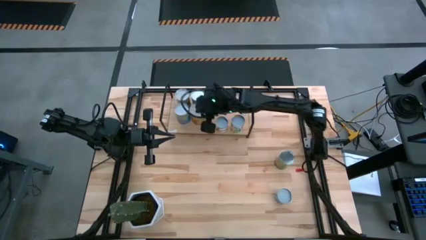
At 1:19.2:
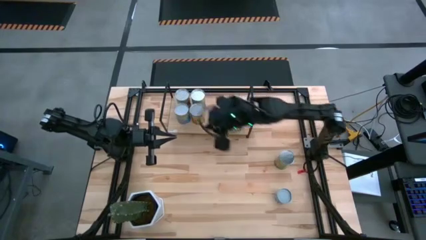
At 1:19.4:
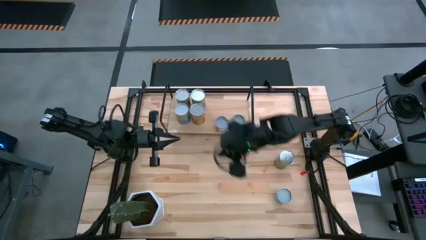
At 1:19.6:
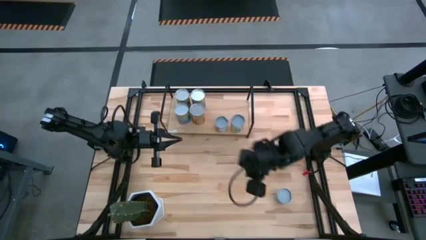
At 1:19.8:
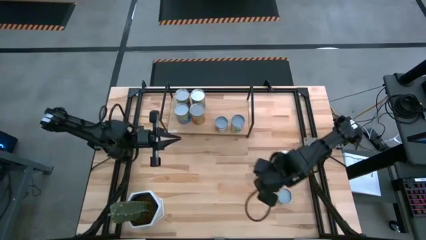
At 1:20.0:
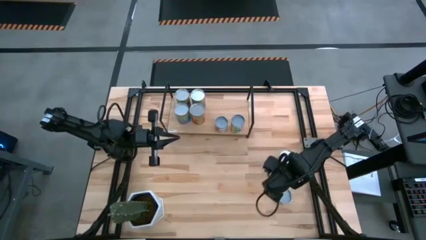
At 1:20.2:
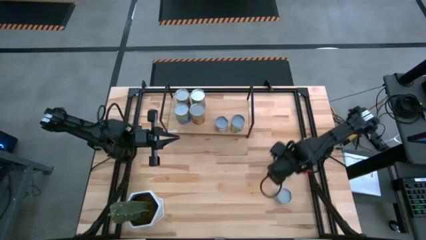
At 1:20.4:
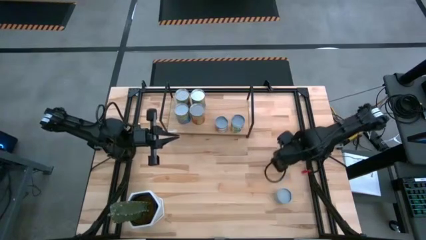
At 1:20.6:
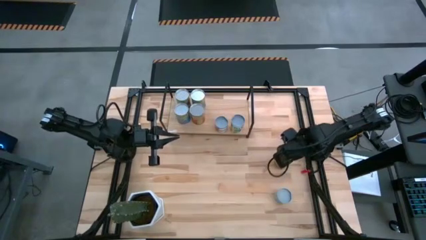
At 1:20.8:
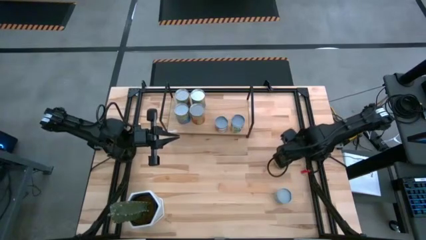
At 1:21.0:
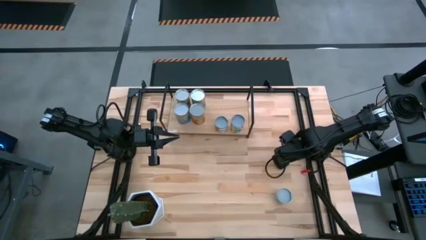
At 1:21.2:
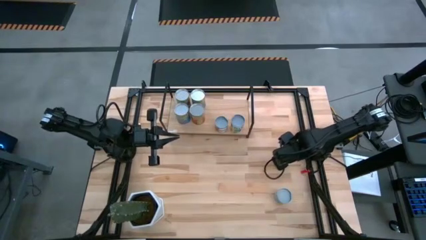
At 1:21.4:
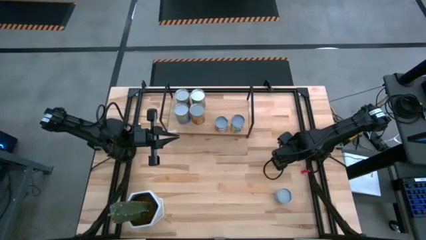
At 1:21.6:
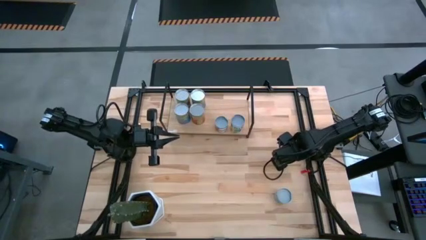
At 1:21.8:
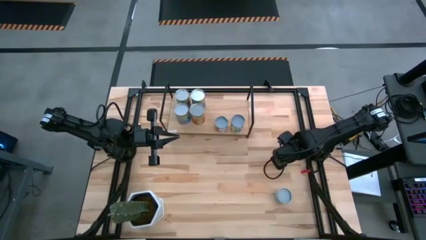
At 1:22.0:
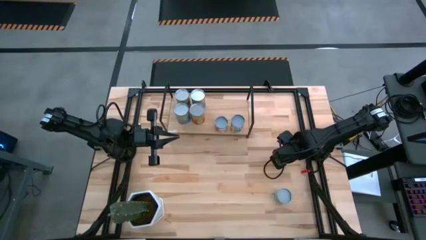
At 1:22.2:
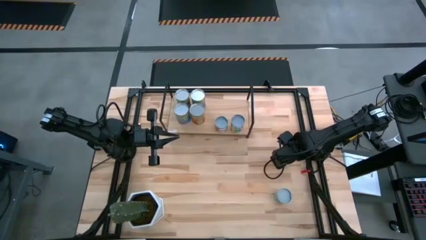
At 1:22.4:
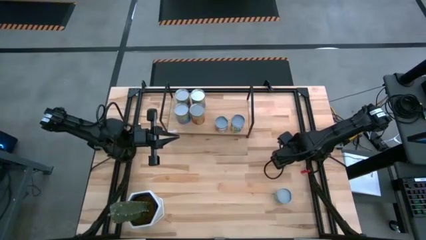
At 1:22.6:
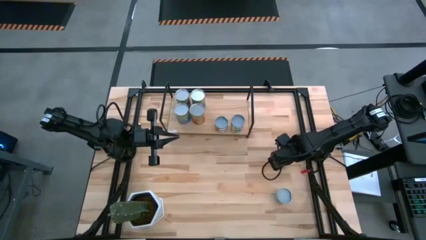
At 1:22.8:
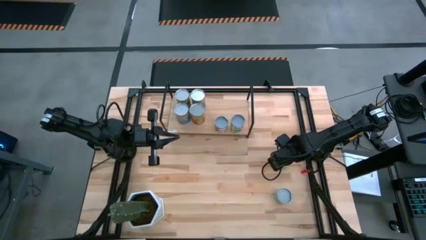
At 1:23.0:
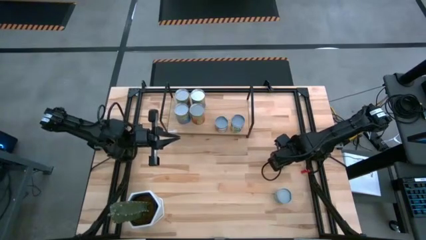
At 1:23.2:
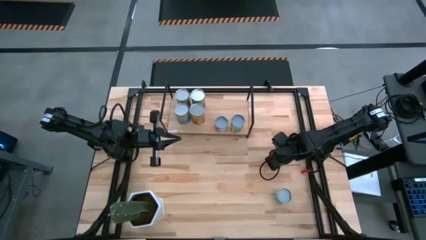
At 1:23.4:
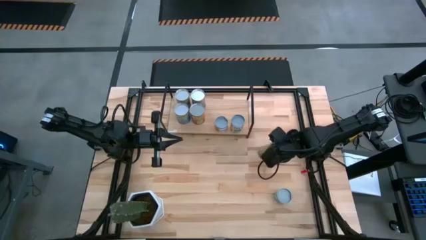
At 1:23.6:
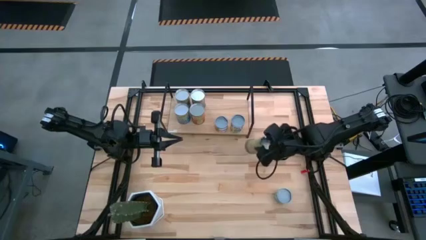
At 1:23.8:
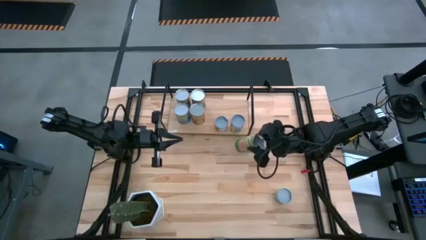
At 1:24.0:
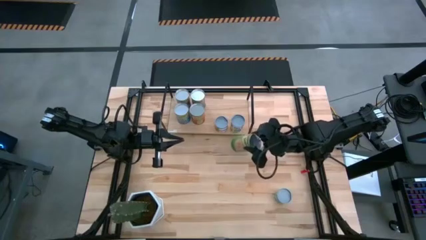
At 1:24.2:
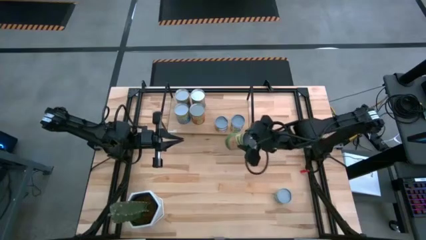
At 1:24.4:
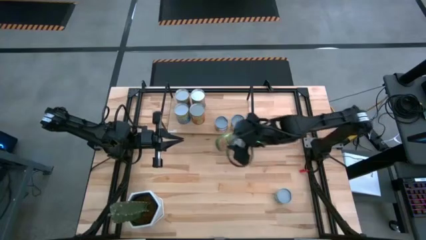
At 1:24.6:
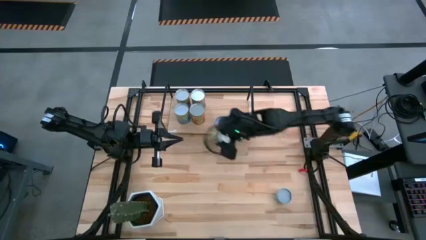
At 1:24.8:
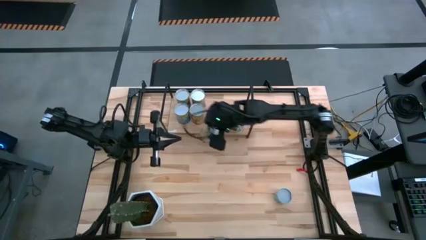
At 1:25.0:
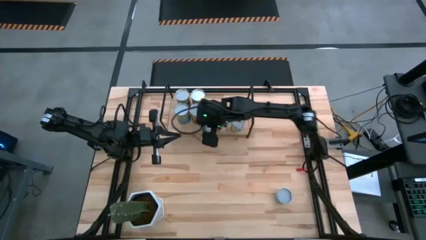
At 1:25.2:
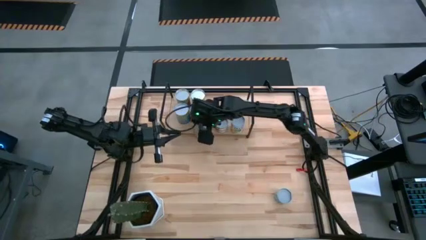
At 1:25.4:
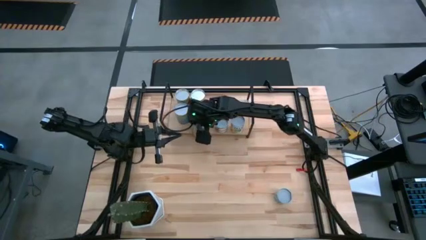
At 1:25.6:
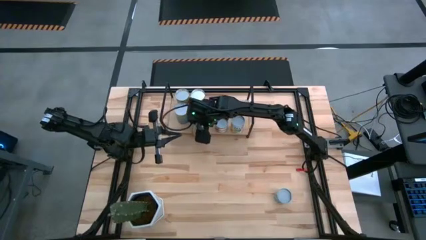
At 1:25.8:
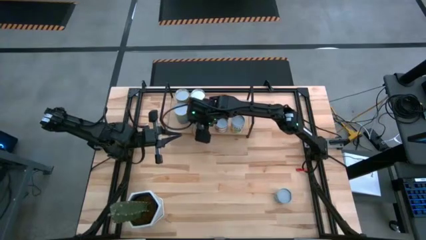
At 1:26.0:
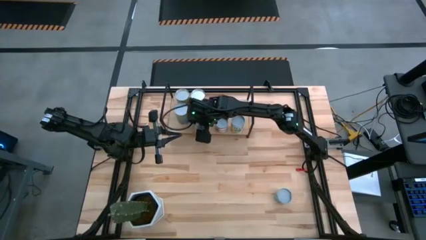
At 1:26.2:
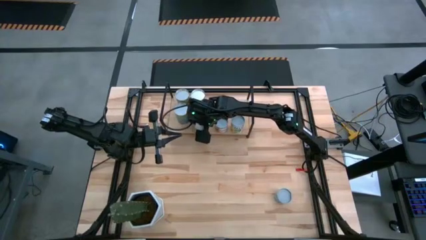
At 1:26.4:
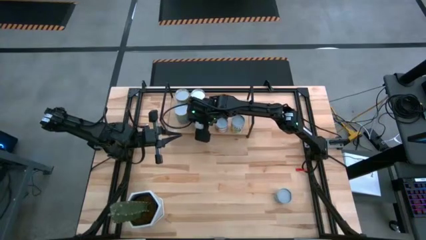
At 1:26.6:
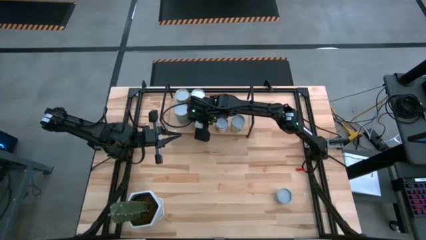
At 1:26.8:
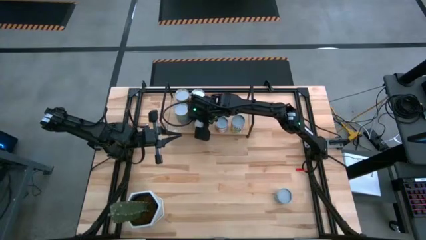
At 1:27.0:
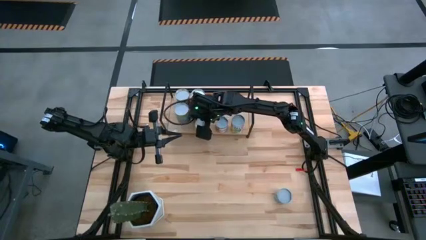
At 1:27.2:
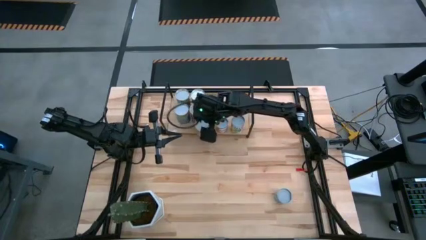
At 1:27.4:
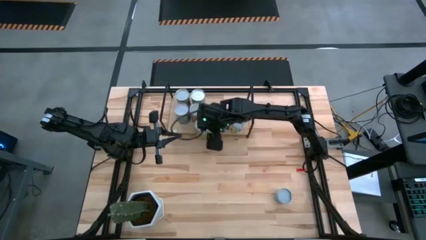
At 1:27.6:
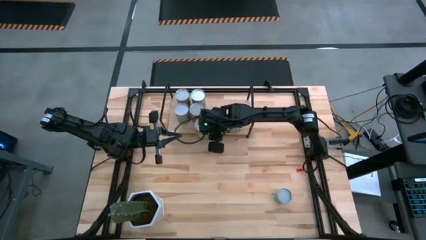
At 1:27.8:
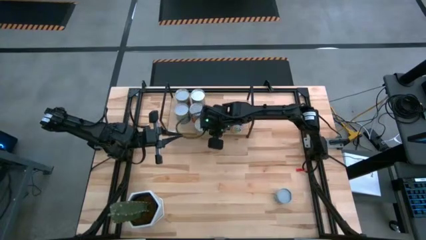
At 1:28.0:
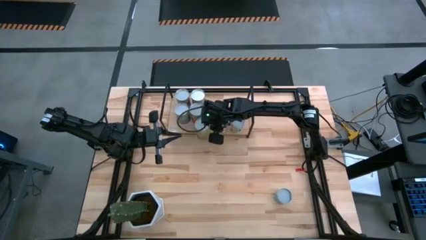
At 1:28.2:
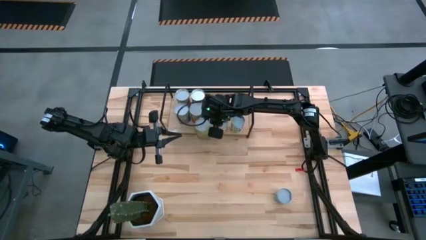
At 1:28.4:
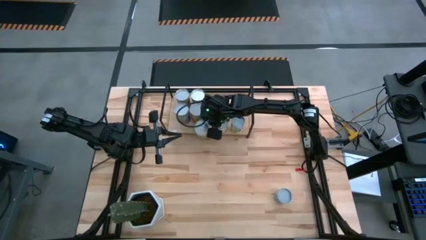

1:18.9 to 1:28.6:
Task: Pick and place cans onto a shelf
Put the large canned oranges on the shelf

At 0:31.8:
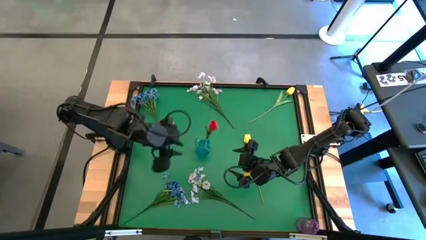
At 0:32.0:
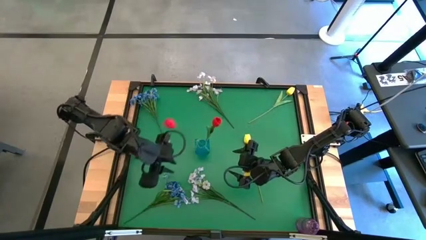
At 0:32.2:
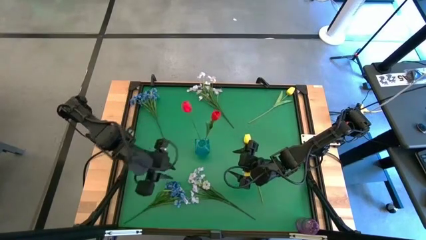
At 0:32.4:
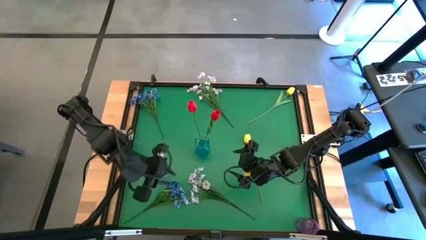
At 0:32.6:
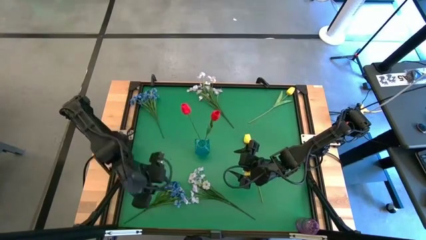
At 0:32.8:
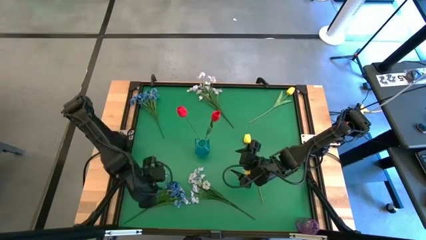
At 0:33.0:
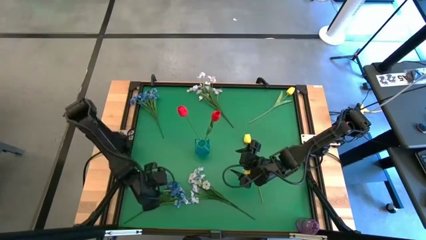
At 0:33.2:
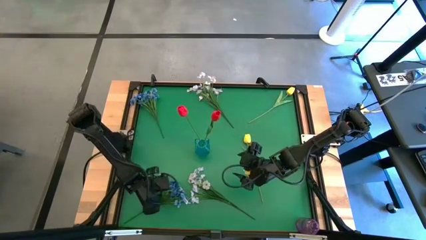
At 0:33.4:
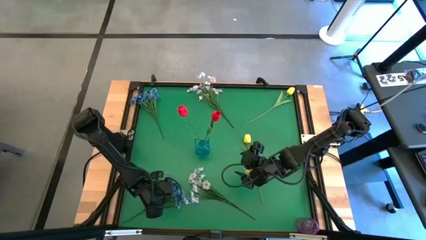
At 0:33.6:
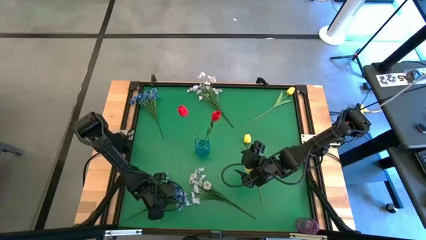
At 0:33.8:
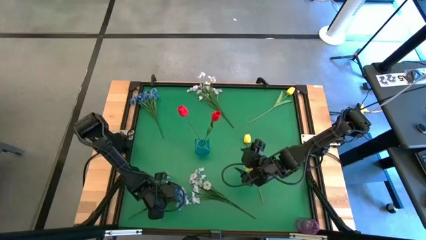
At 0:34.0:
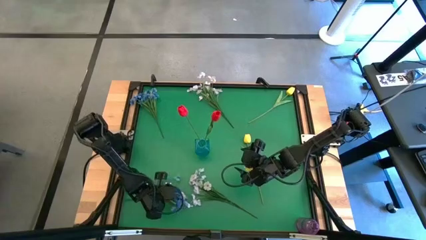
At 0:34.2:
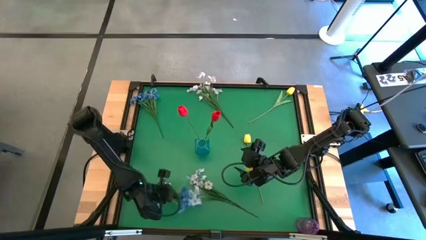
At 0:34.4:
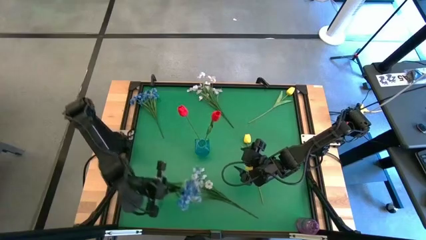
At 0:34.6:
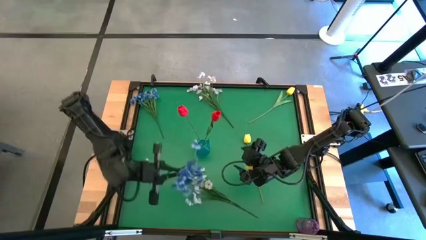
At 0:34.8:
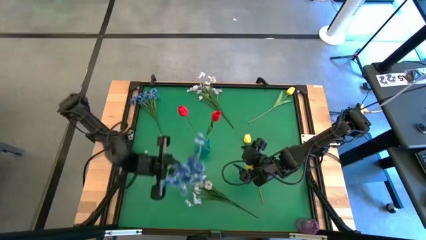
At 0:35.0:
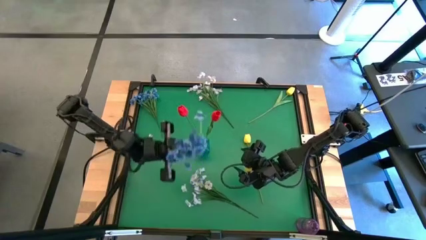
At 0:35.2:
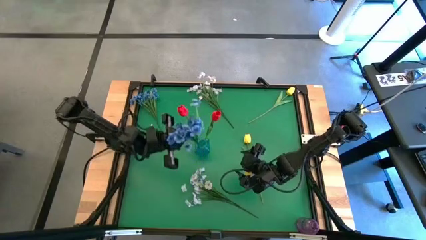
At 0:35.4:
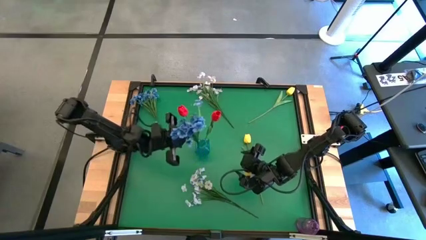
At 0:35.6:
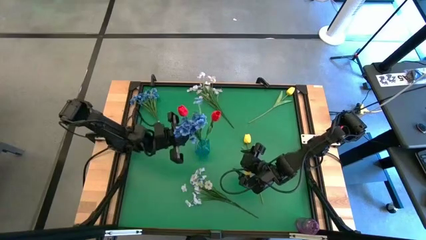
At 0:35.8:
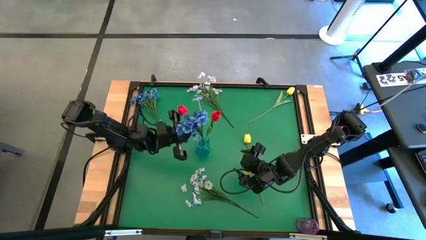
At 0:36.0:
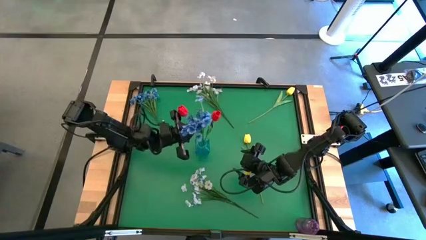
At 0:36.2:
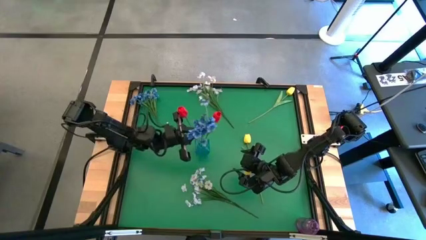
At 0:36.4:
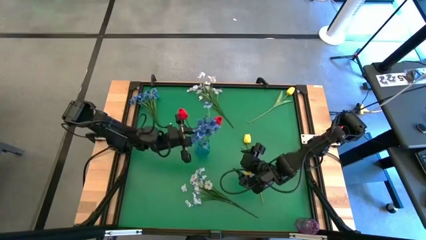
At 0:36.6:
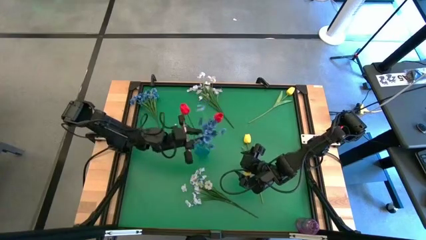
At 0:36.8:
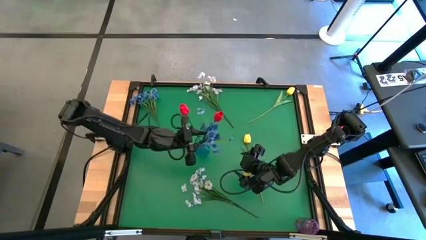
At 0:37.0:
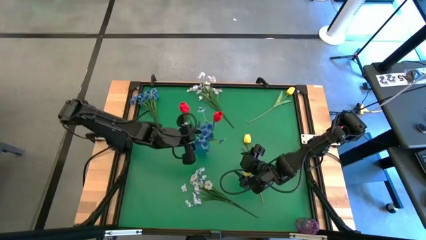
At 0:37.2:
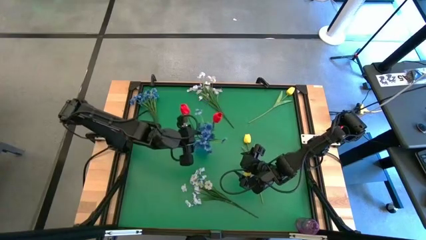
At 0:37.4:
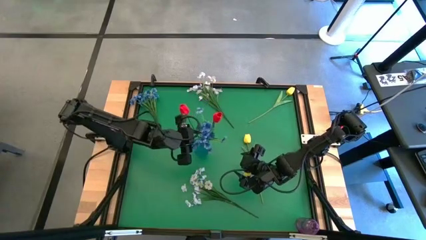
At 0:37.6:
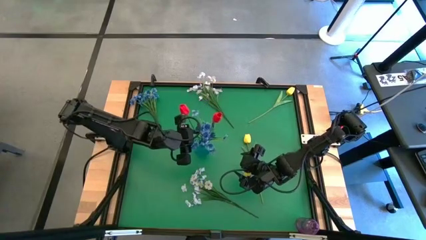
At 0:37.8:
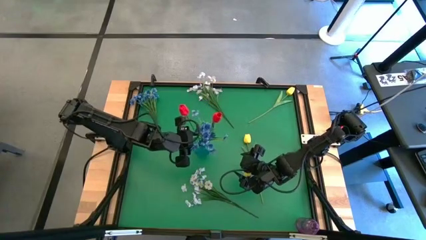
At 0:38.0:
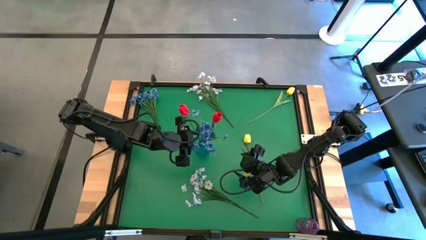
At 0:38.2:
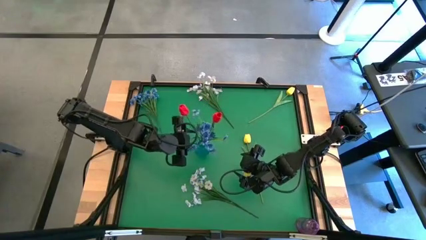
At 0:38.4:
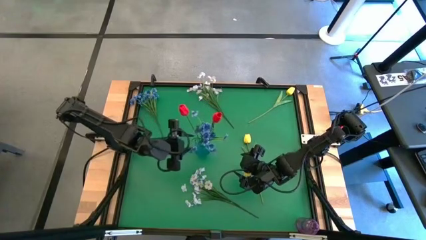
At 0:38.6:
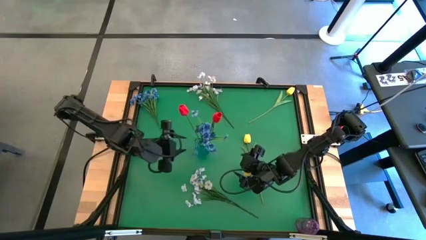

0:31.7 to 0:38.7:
Task: Sort flowers into vase by color
Put the blue flowers into the blue vase
